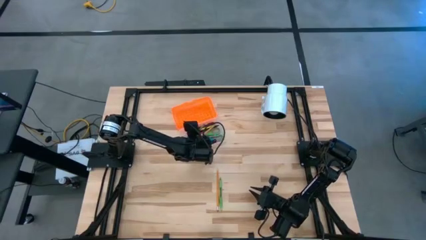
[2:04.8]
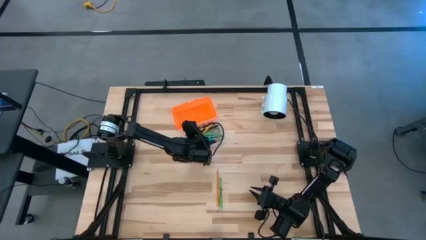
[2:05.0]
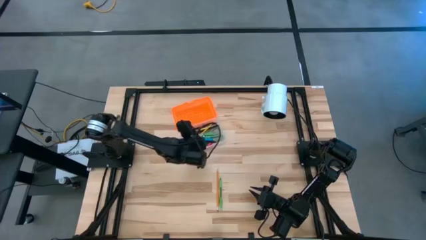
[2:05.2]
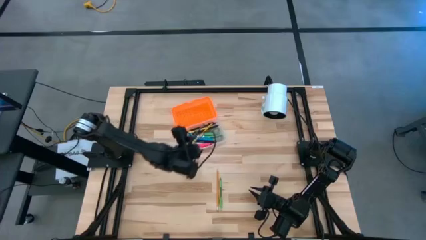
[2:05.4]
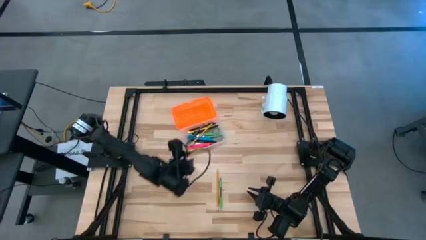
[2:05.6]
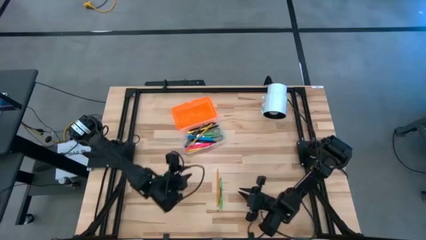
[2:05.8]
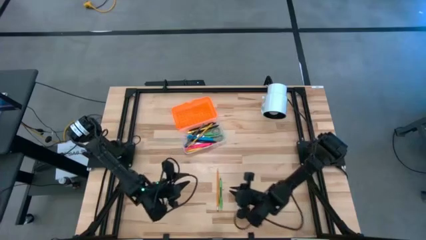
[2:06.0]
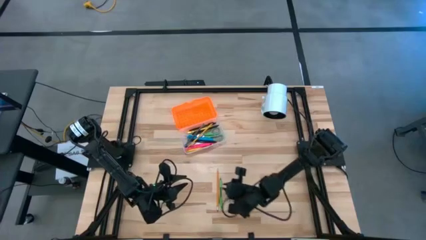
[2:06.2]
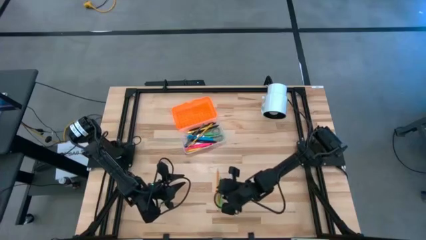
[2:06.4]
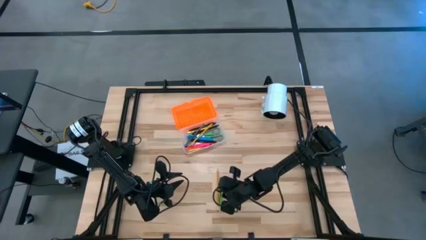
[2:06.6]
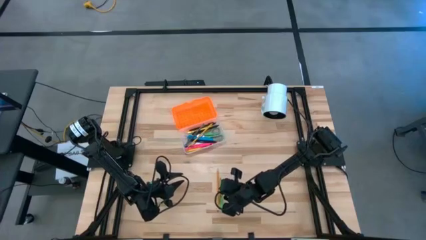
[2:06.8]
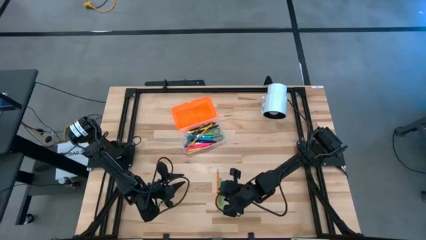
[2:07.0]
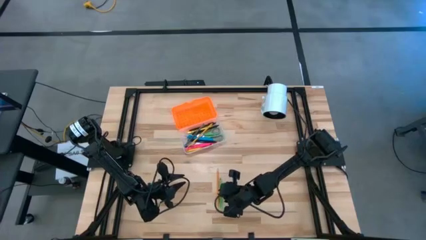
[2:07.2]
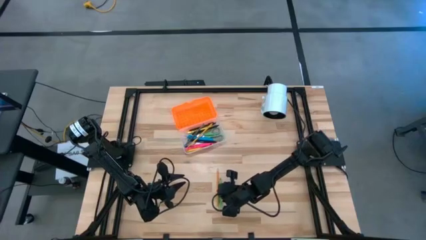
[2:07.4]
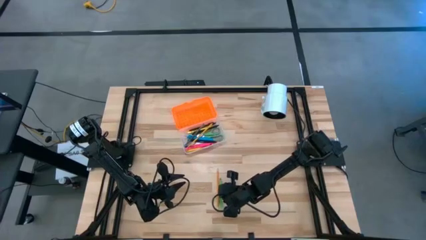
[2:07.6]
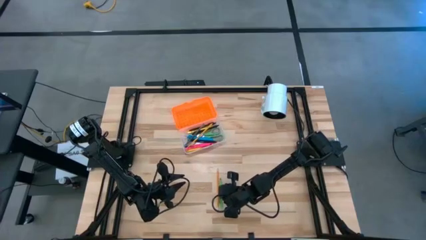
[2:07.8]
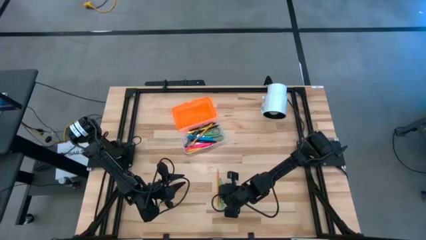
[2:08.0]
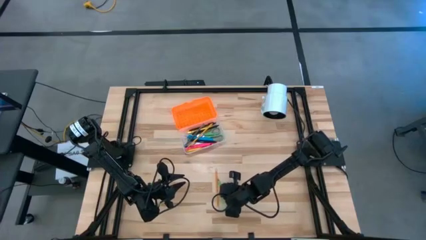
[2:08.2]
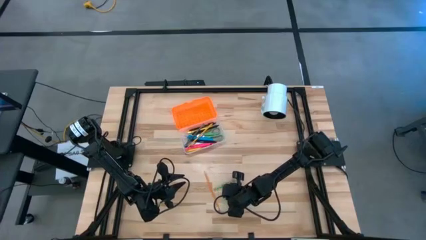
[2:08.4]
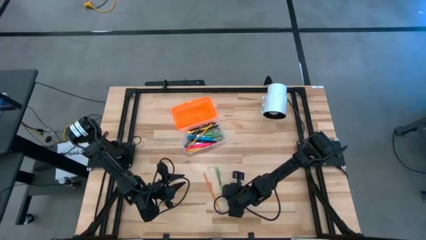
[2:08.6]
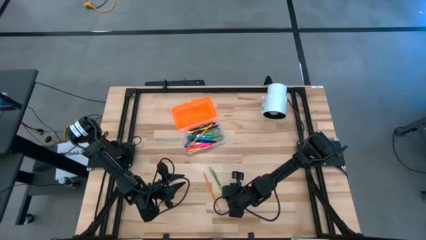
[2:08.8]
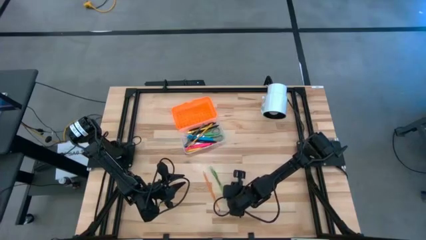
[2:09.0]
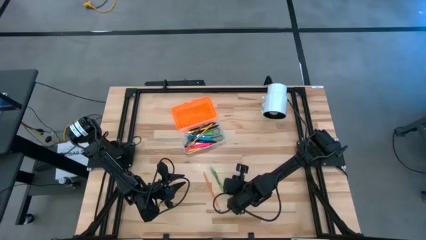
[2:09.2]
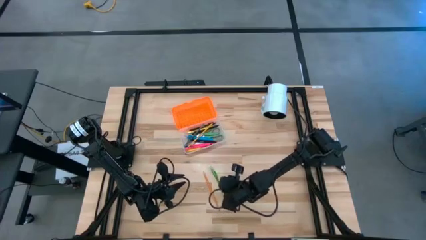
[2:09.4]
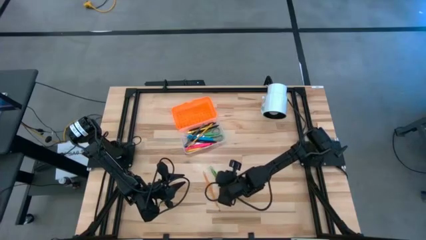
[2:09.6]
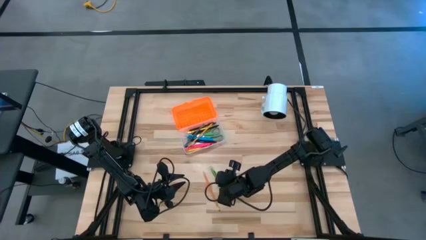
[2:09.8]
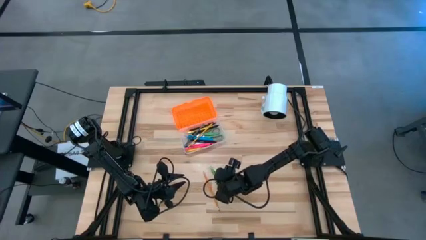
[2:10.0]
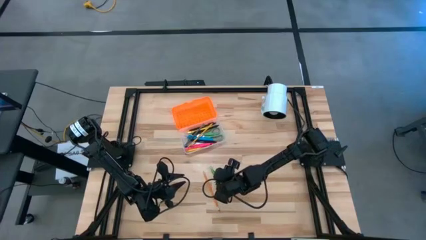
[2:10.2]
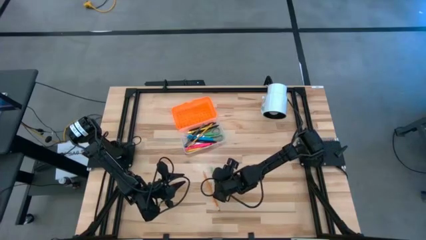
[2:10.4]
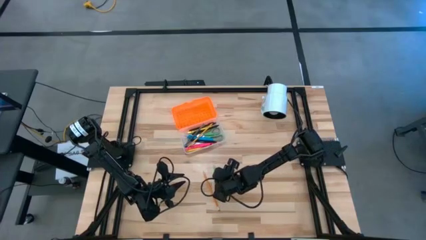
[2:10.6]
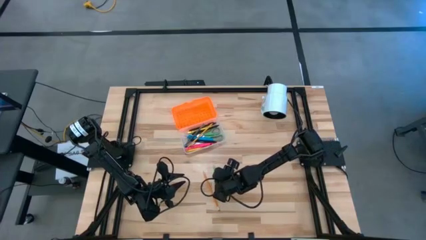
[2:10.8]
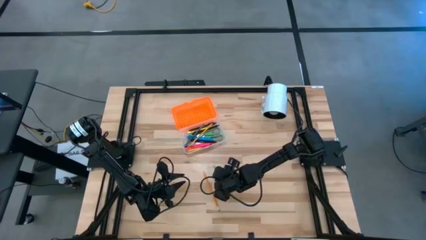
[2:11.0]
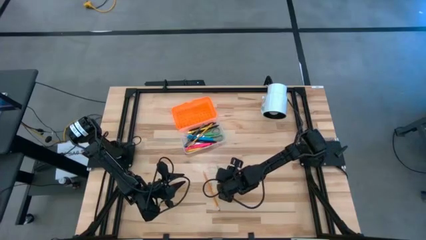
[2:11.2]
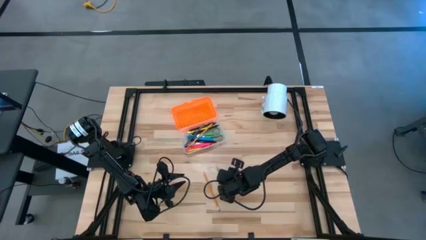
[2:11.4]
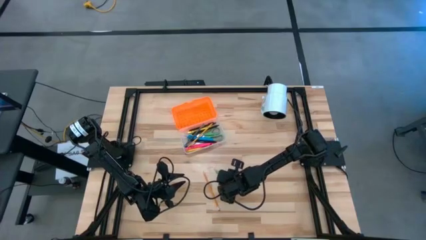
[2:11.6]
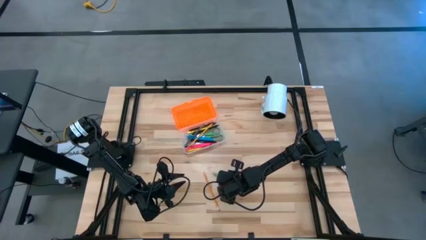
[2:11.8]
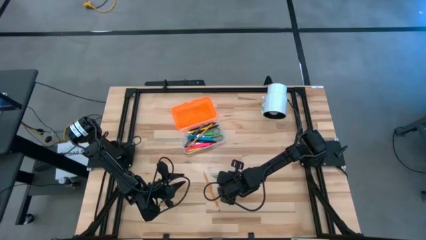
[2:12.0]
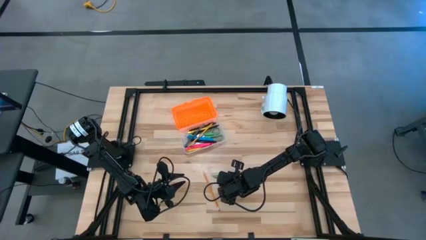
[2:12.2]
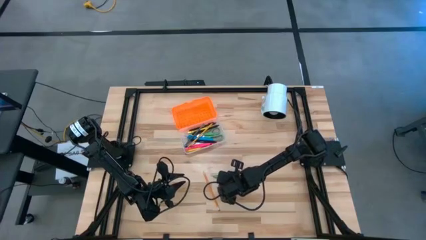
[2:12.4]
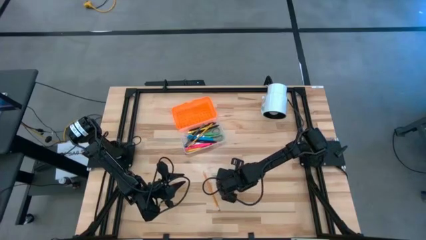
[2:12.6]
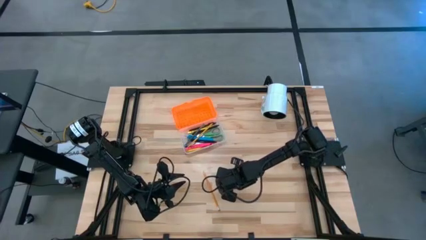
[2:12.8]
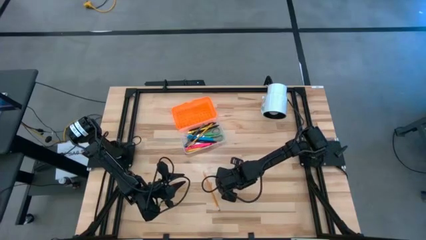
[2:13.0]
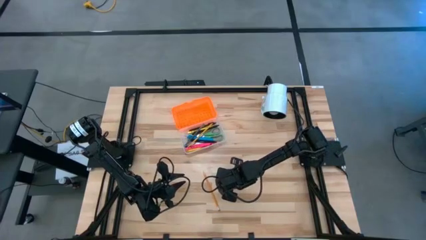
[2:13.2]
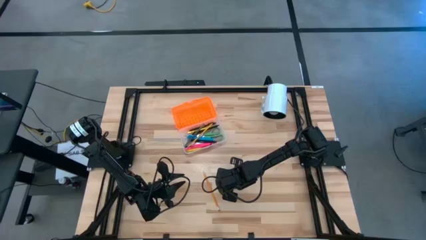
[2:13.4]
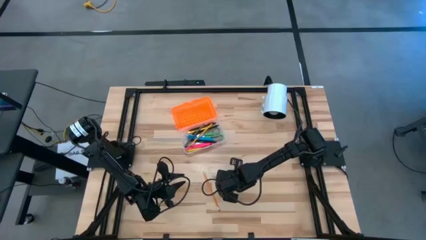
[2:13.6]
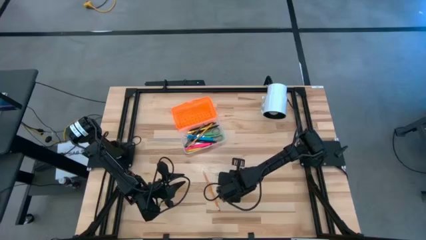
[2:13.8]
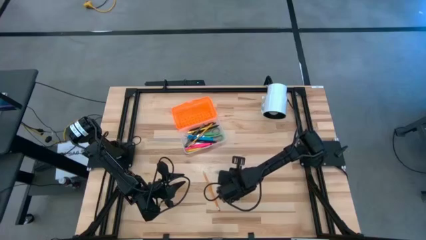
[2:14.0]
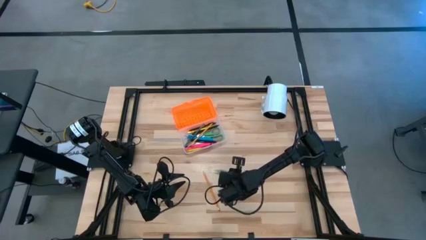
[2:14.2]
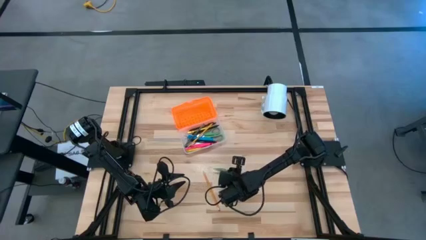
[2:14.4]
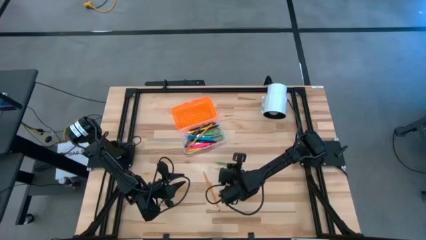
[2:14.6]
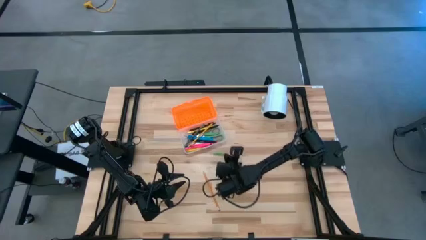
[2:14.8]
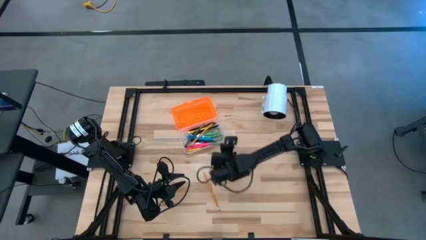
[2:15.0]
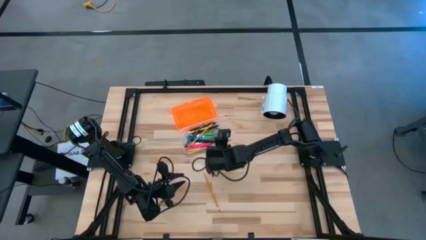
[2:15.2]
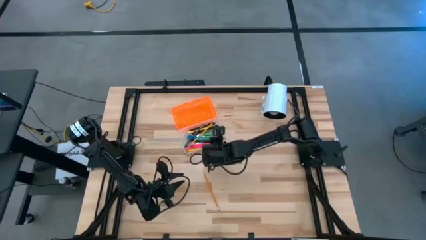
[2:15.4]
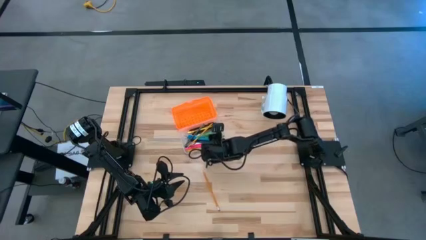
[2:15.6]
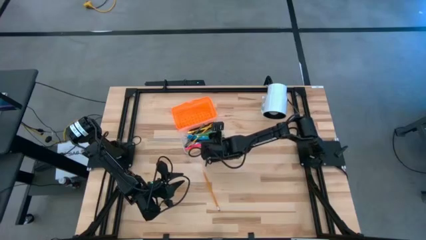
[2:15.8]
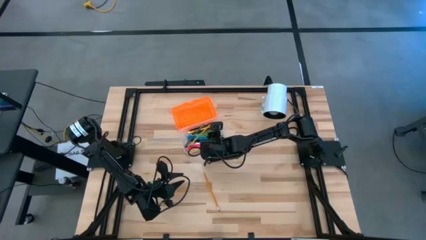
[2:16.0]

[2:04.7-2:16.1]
Task: Pick & place school supplies into a supply box
Put the green pen into the supply box

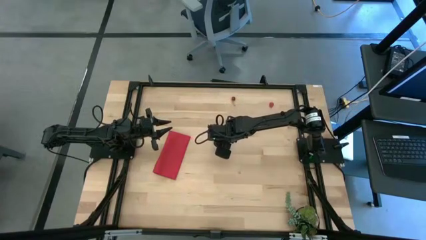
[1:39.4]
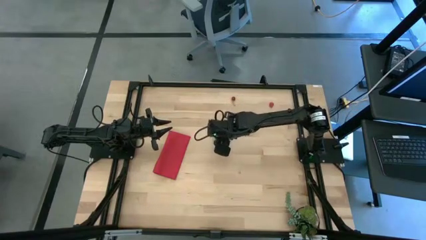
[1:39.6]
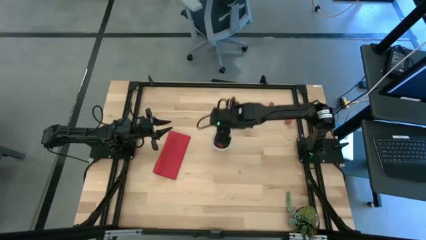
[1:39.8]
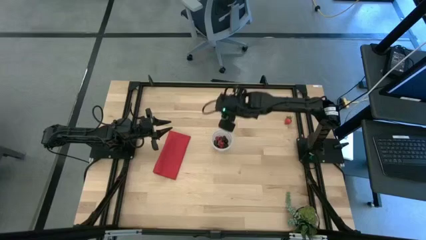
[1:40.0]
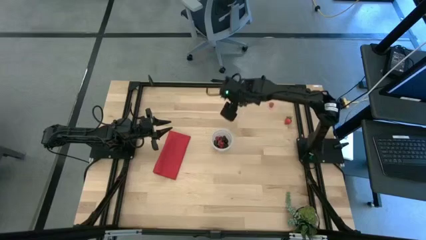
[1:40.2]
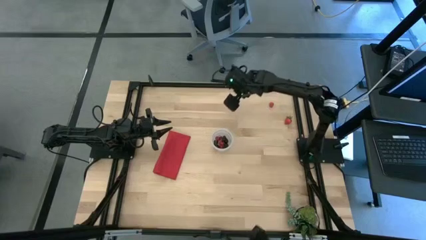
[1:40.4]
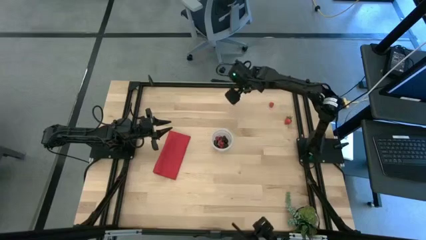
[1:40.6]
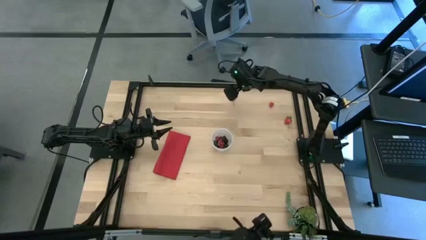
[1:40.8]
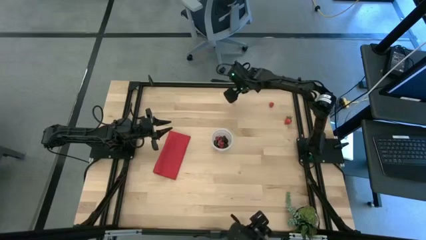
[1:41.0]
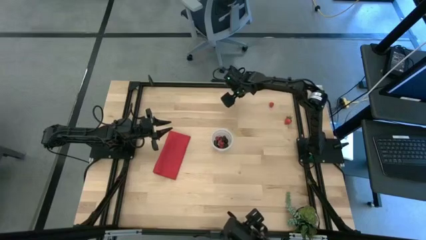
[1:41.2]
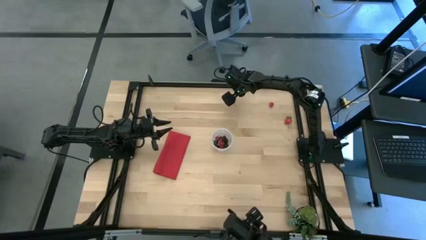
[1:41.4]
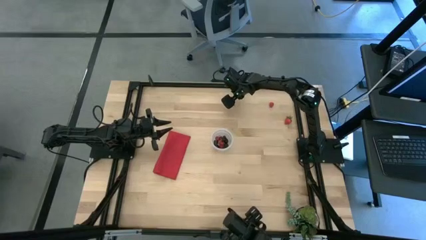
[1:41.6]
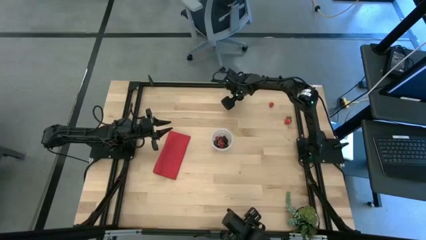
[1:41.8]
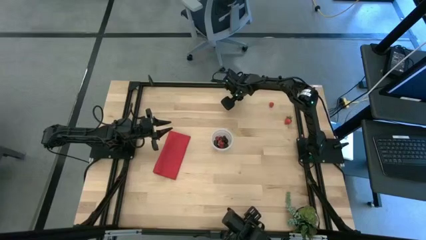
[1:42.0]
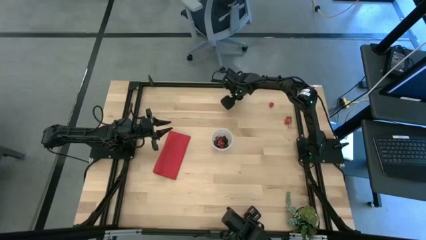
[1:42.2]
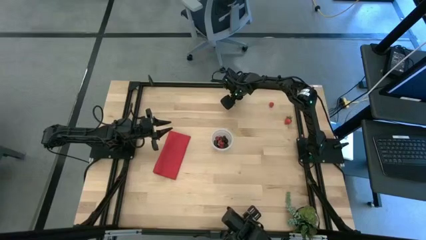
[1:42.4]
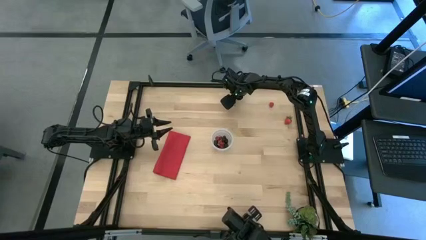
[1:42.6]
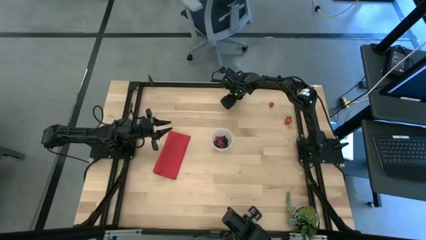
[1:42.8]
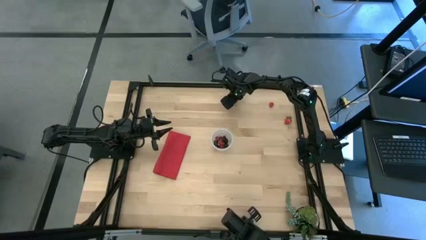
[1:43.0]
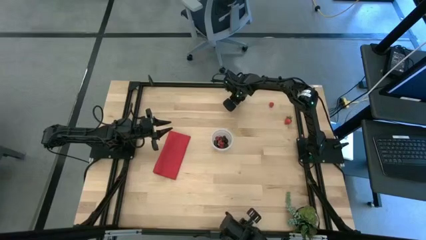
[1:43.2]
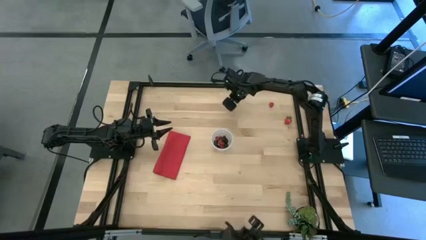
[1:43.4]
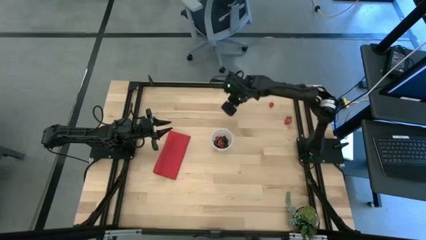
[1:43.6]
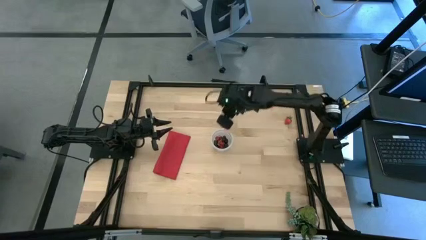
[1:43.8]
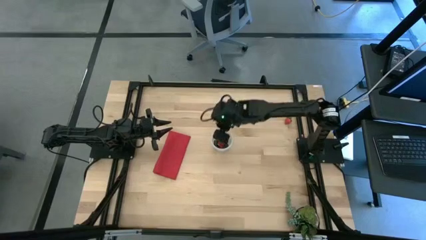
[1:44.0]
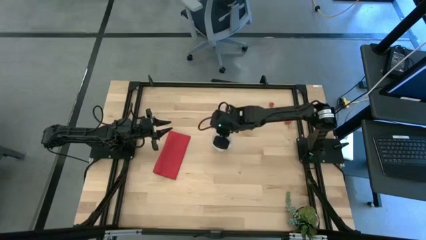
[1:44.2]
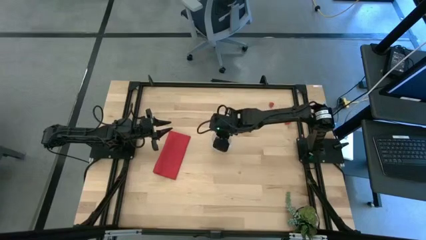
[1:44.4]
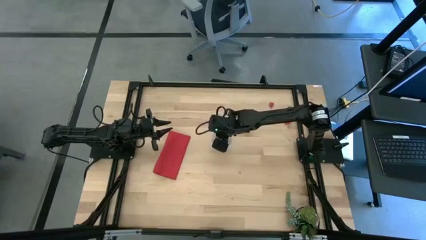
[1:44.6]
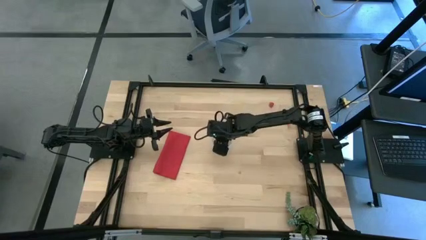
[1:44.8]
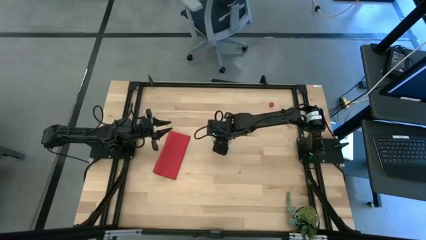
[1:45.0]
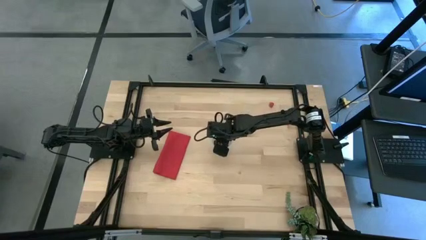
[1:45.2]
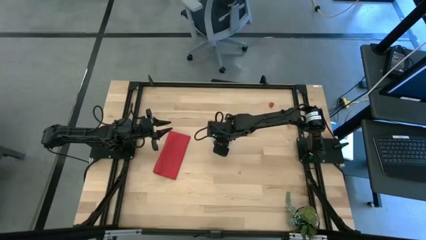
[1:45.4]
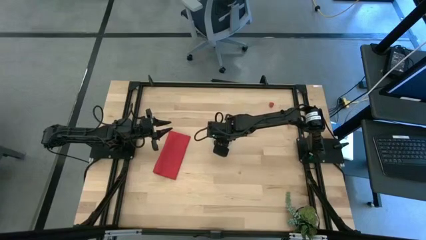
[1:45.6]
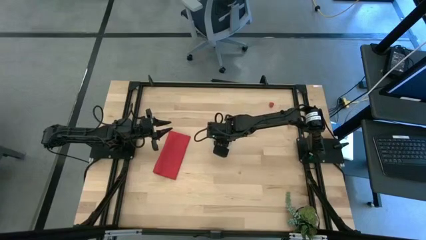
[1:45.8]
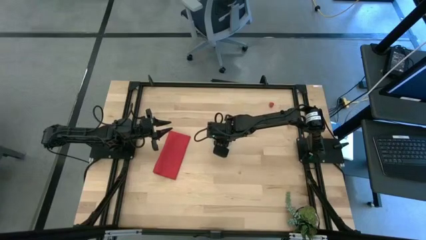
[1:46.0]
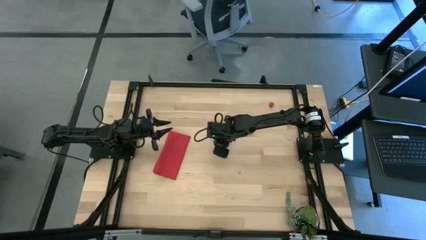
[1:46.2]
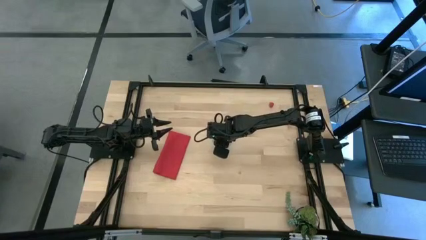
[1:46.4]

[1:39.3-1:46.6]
Task: Pick and placing Produce into tupperware
Put the red cherries into the transparent bin
